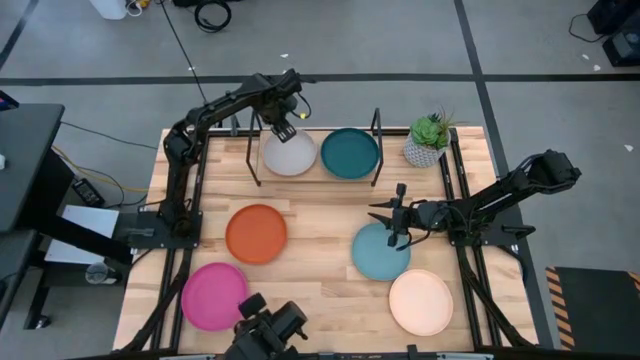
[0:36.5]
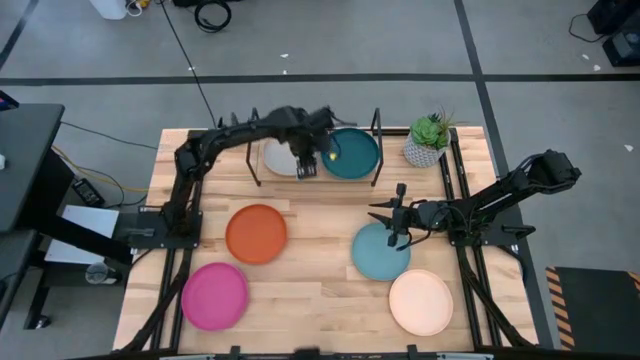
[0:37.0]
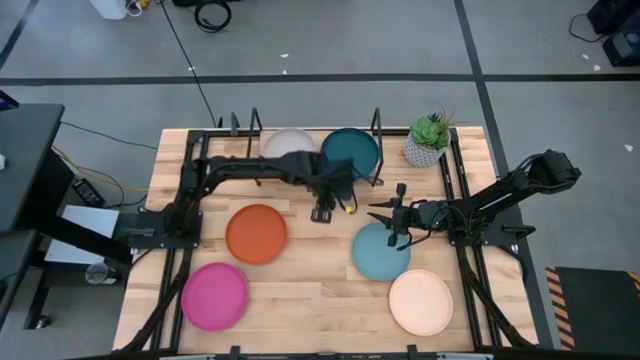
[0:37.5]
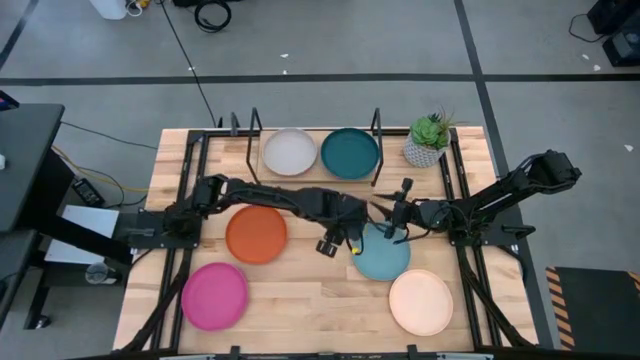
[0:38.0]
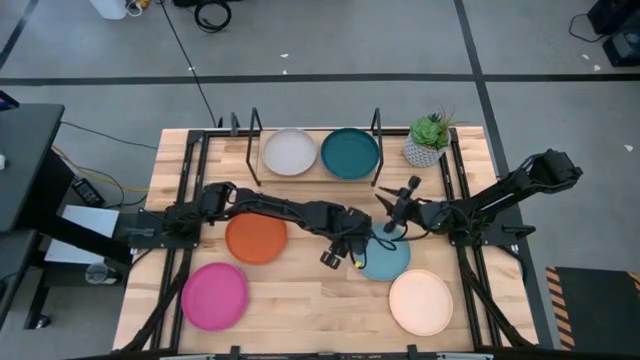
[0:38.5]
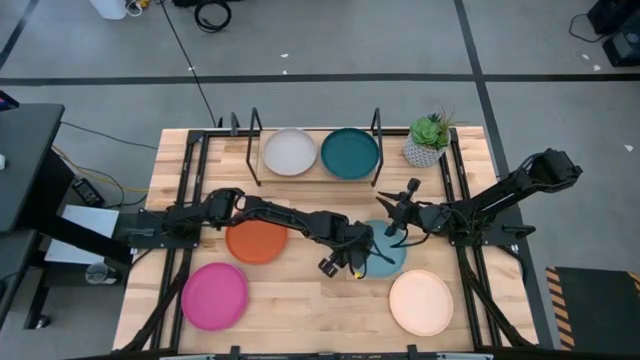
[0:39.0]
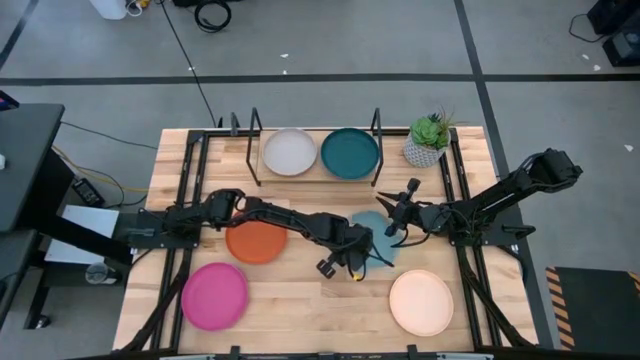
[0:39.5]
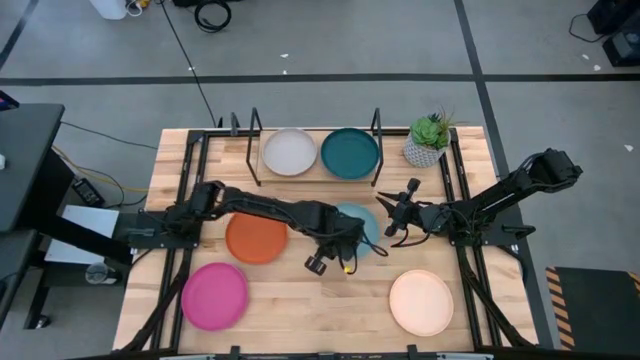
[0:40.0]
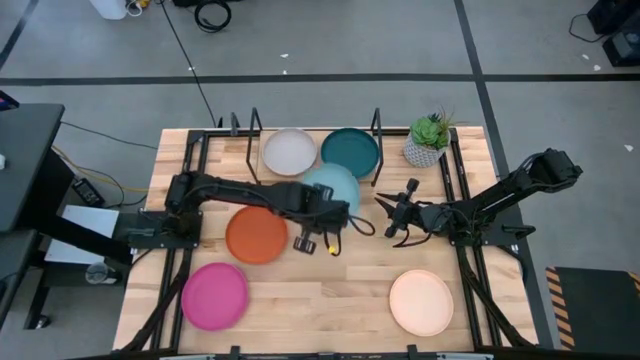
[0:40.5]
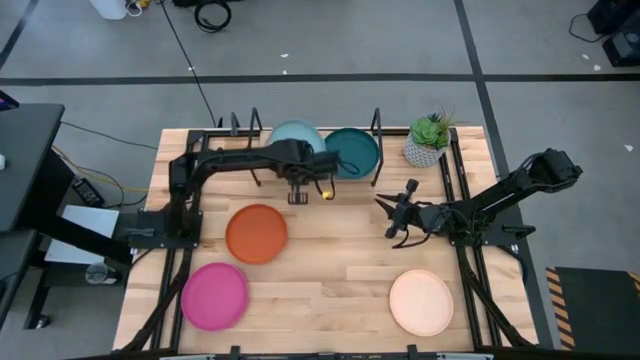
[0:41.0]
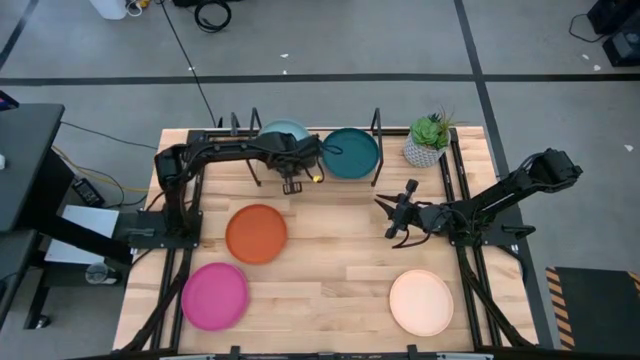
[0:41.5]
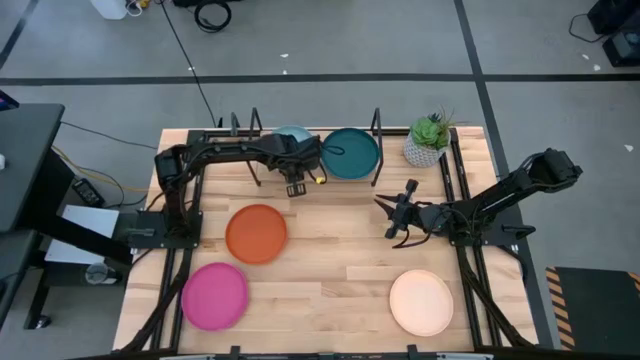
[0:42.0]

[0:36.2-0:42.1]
Task: Place and stack plates onto a shelf
Stack the blue plate on top of the gray plate on the shelf

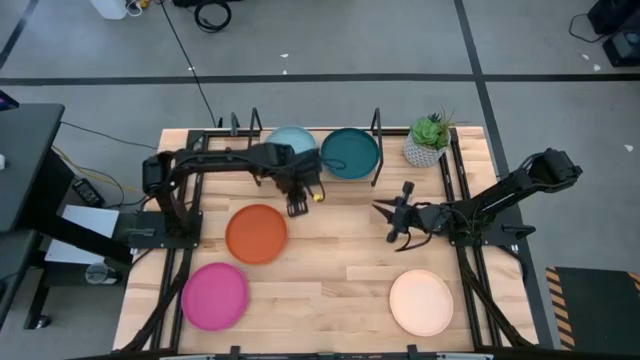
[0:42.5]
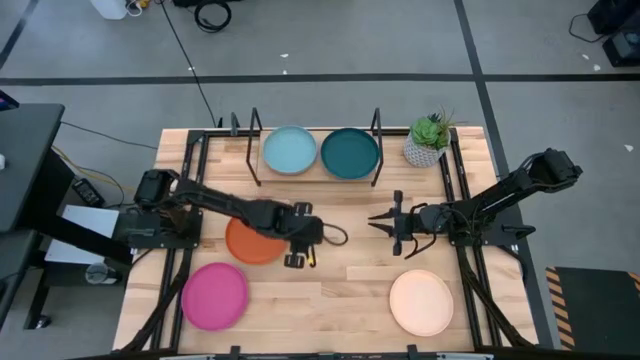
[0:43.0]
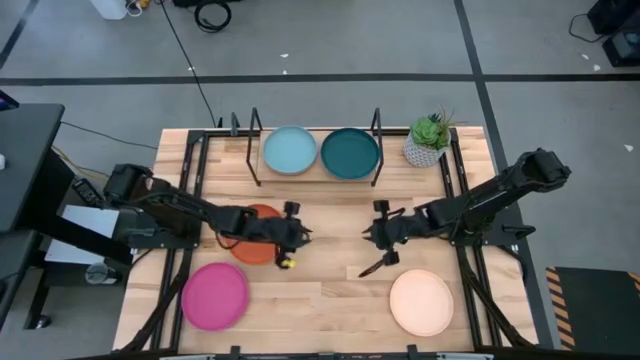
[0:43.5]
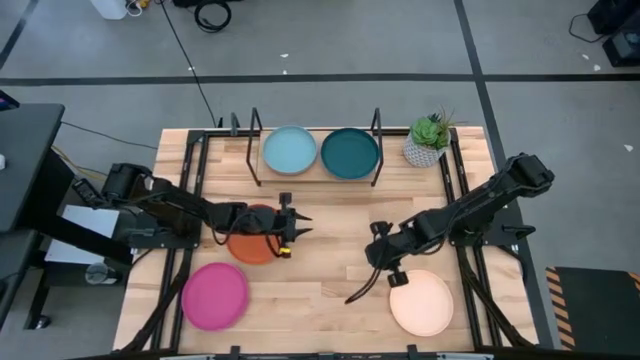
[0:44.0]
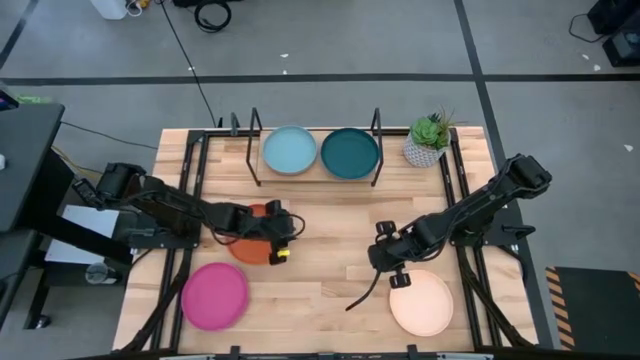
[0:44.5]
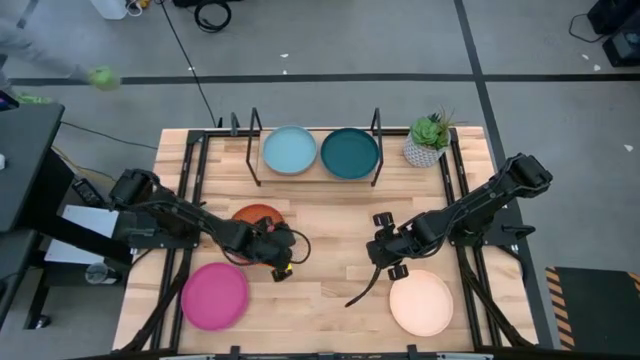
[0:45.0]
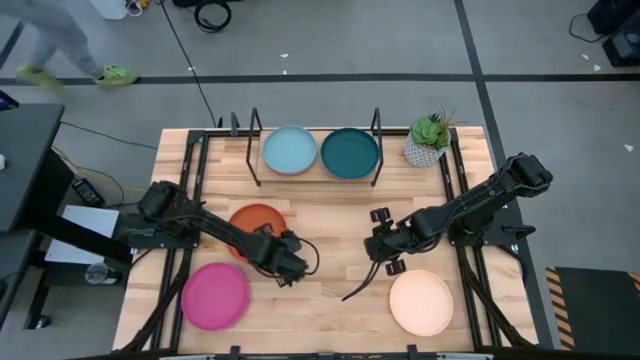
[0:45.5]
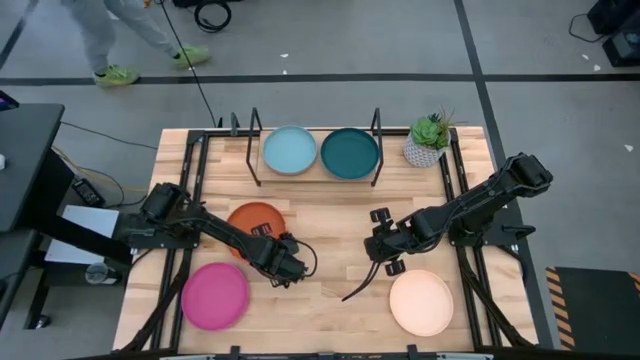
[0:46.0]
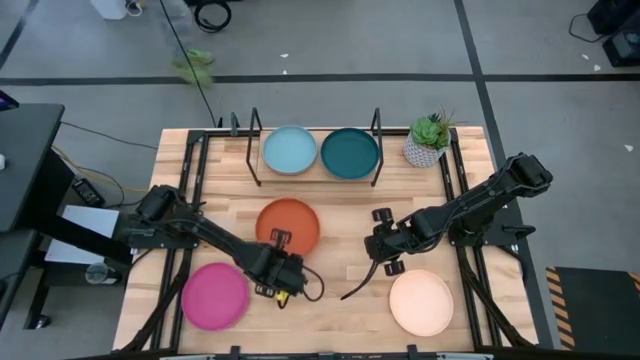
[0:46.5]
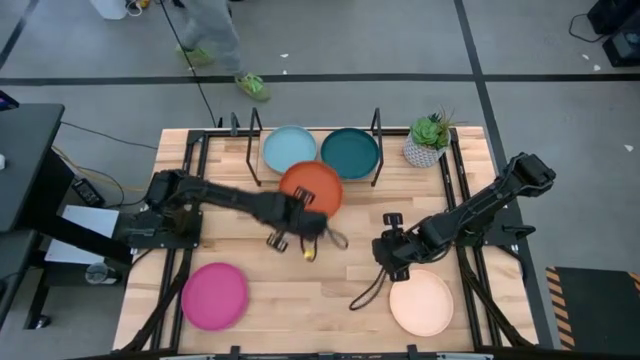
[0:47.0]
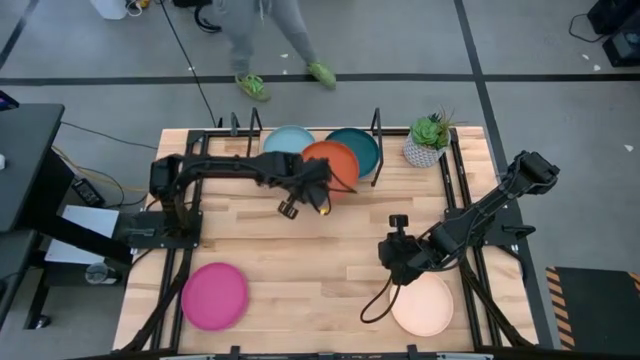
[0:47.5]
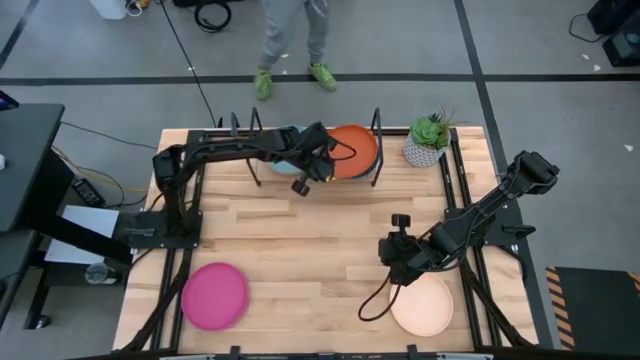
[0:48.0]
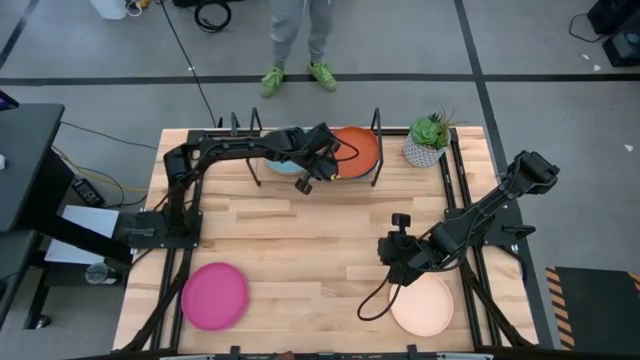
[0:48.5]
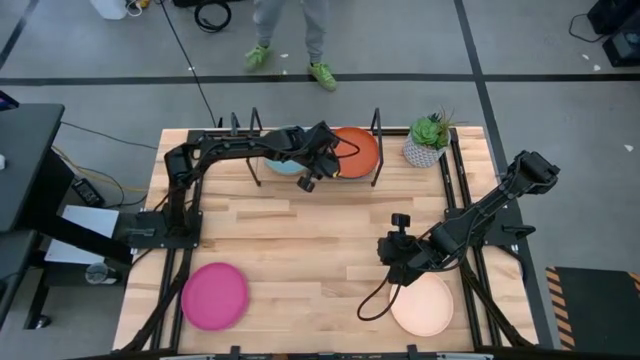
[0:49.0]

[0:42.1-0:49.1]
Stack the orange plate on top of the dark green plate on the shelf

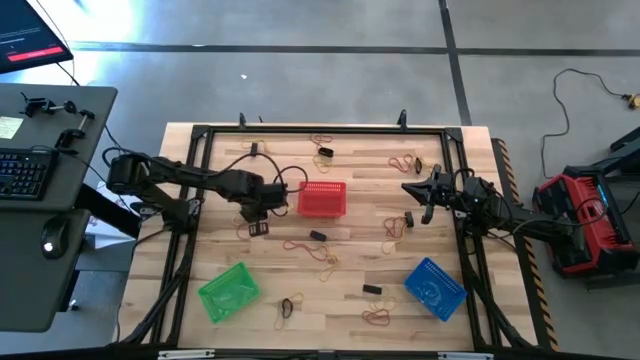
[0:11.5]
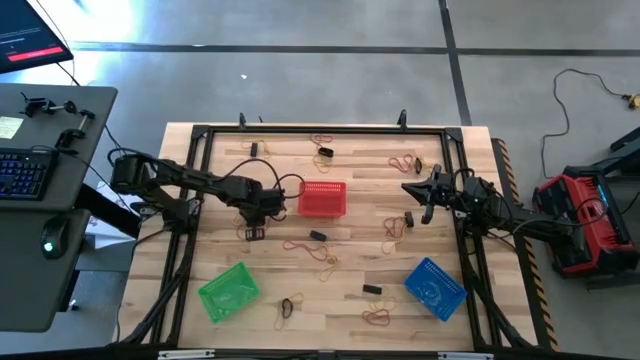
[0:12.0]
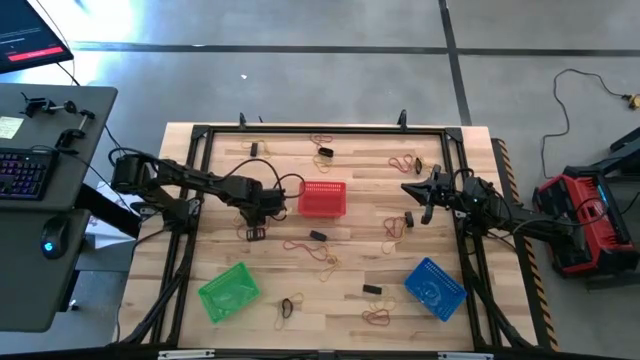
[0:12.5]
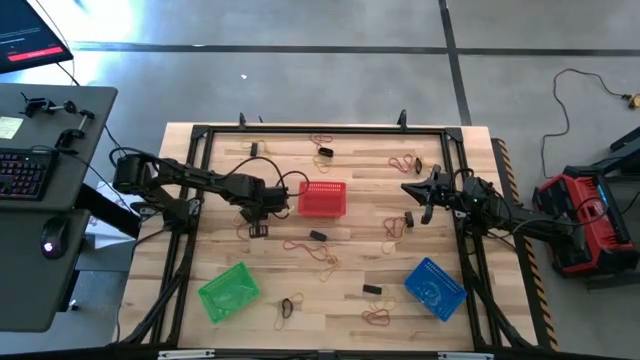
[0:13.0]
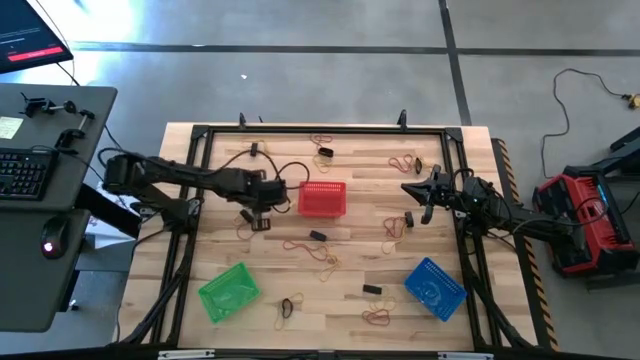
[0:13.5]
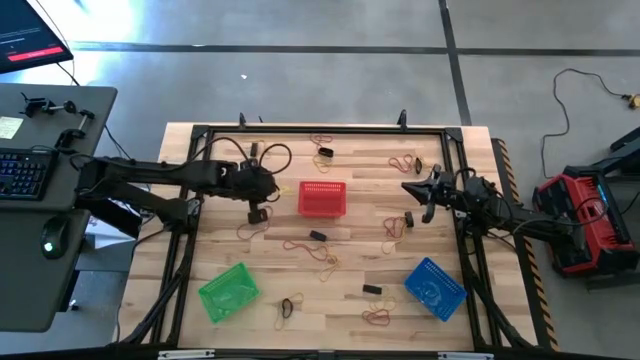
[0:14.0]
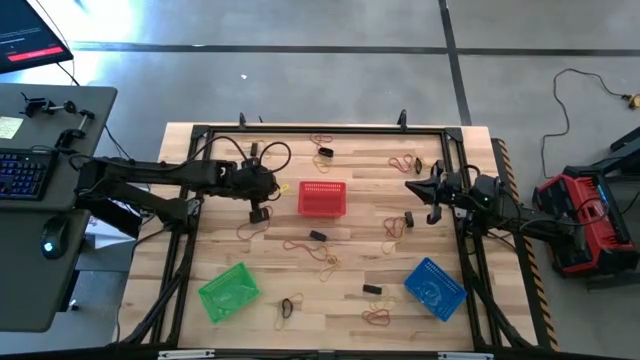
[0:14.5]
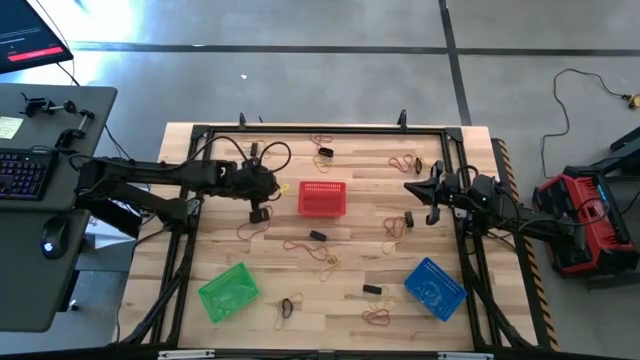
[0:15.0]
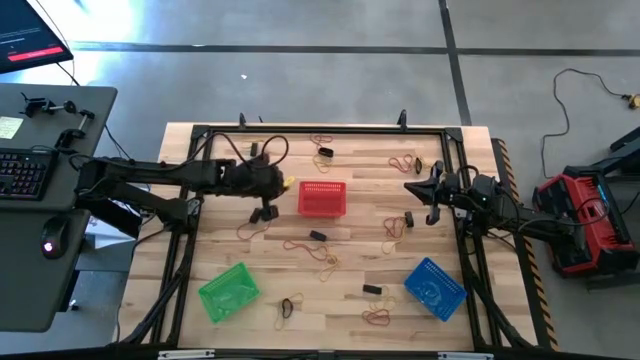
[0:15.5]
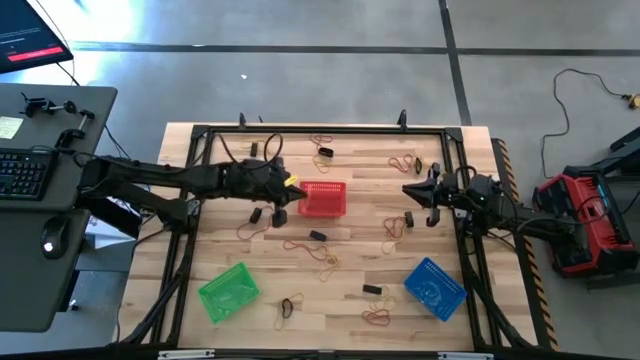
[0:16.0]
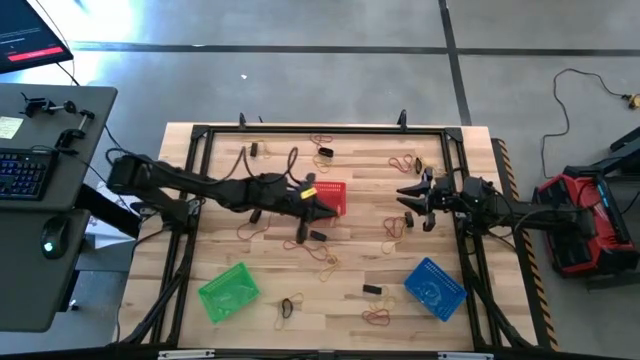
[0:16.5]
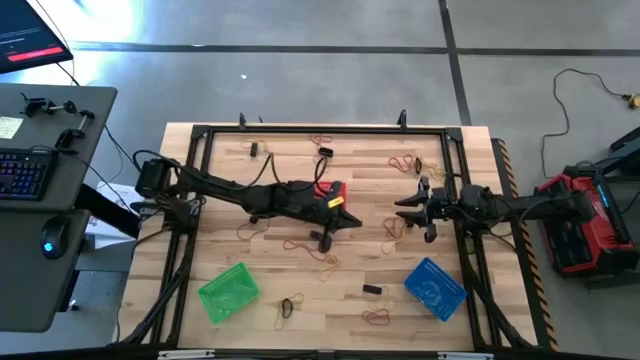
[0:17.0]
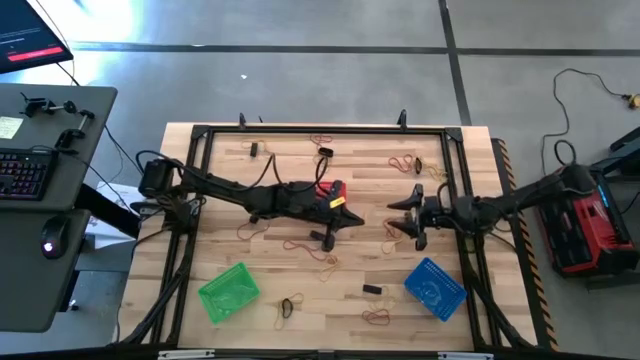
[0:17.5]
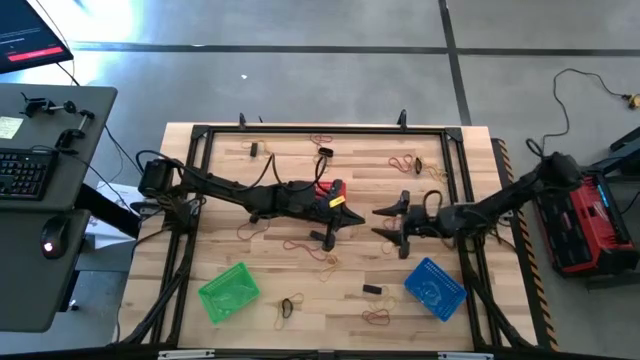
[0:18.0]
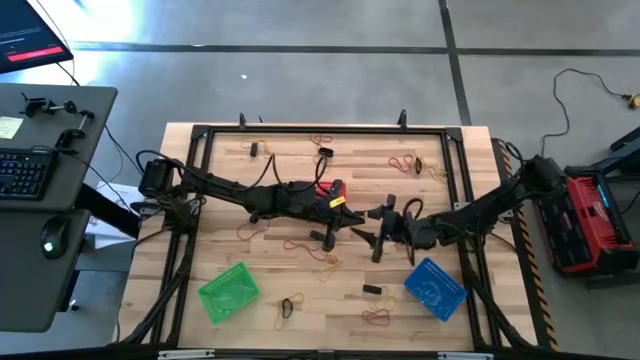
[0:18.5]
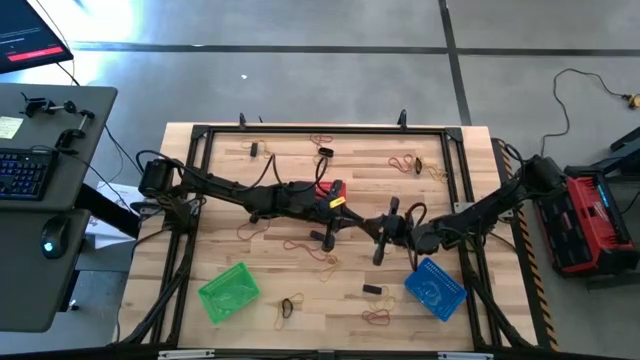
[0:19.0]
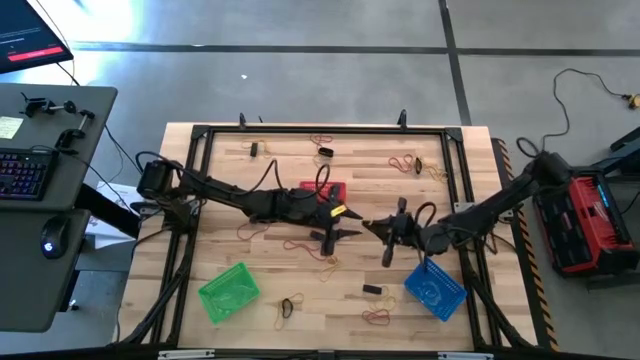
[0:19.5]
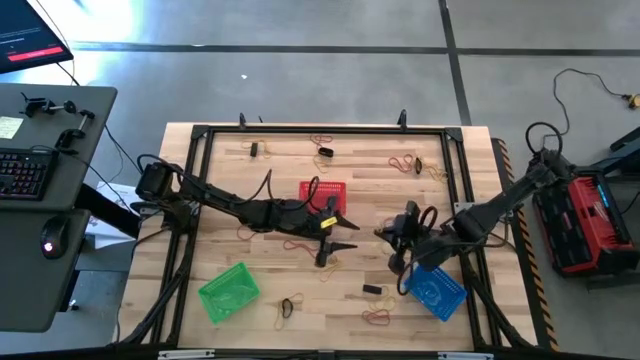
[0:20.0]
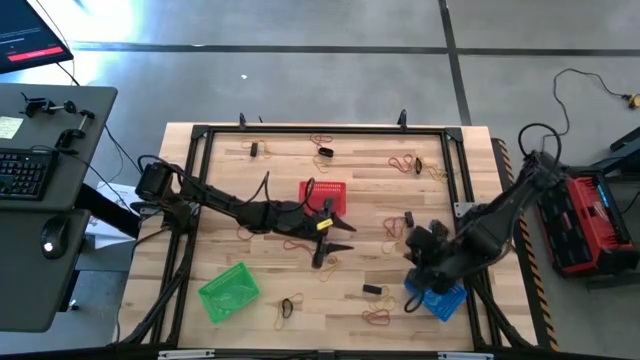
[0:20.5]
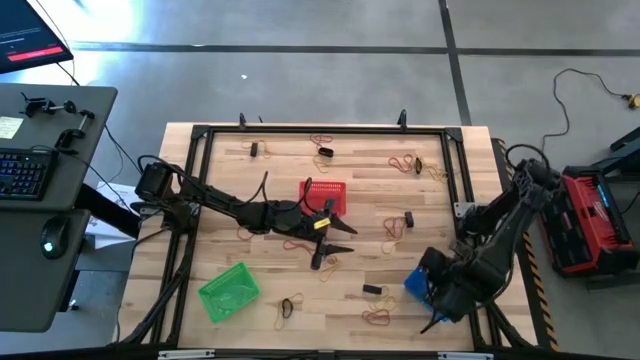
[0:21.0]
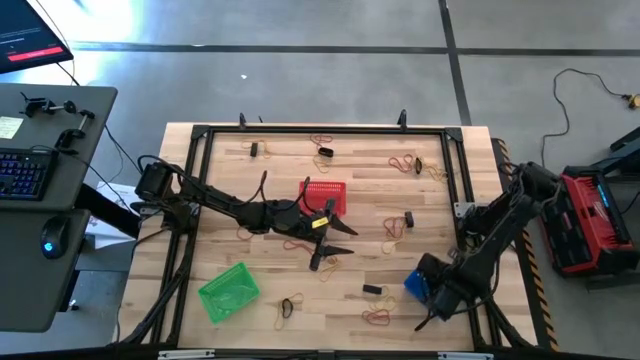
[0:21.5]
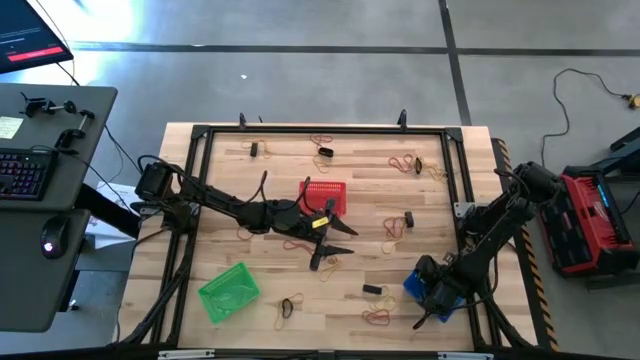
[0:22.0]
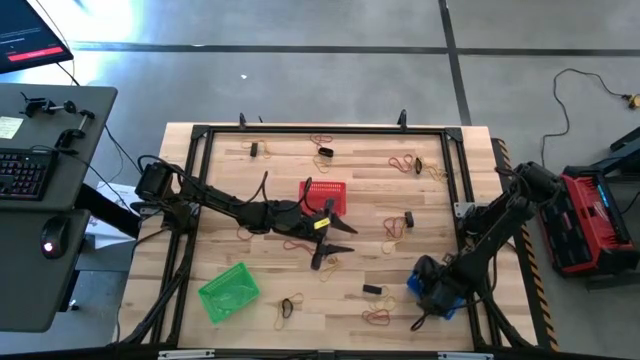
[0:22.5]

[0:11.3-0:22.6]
Task: Sort rubber bands into baskets
Put the yellow rubber band into the blue bin
